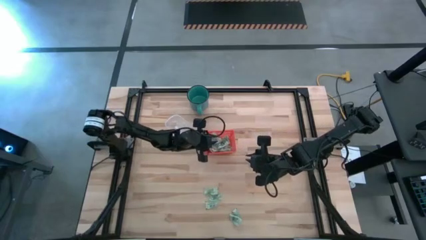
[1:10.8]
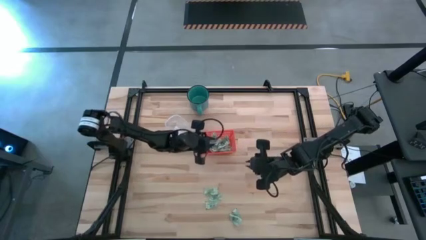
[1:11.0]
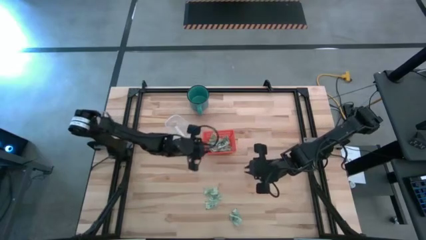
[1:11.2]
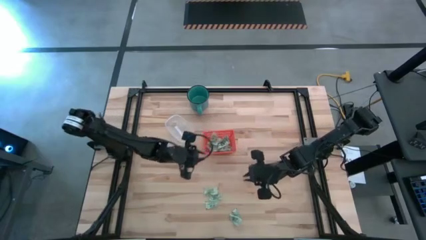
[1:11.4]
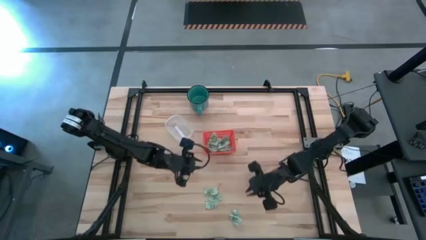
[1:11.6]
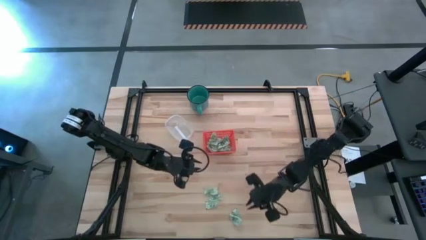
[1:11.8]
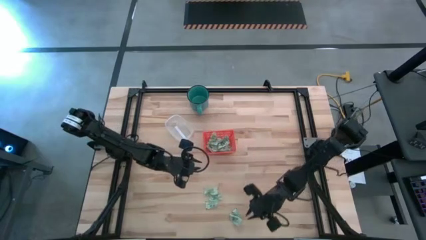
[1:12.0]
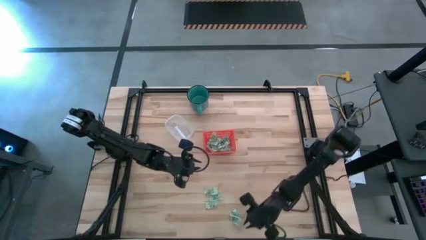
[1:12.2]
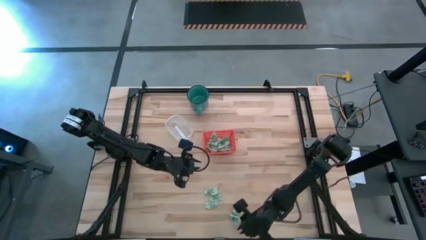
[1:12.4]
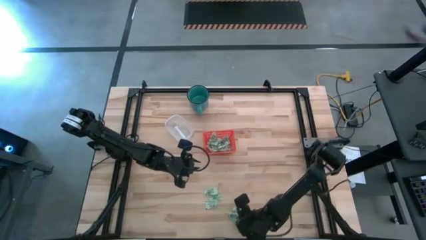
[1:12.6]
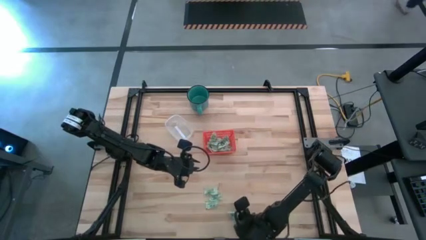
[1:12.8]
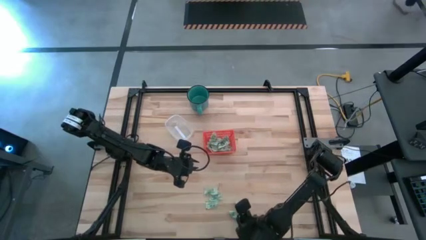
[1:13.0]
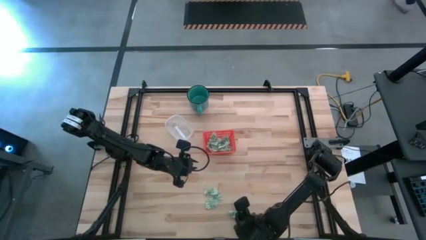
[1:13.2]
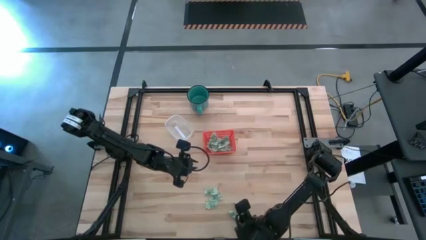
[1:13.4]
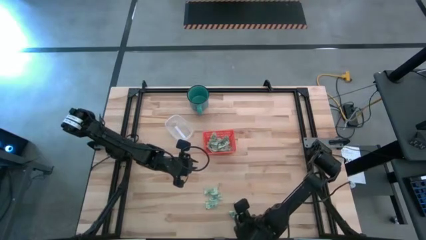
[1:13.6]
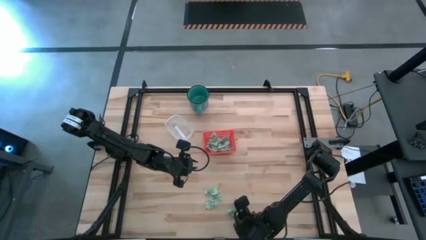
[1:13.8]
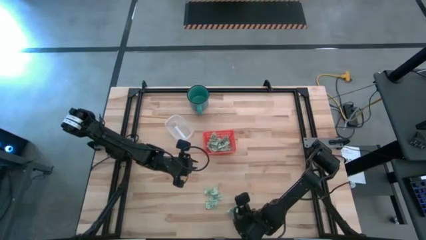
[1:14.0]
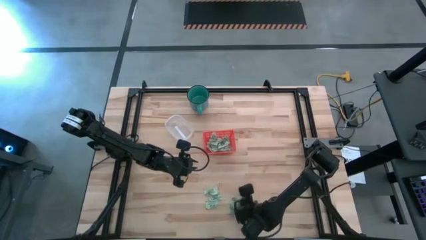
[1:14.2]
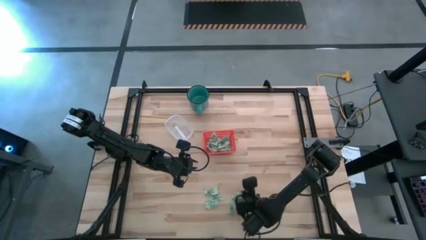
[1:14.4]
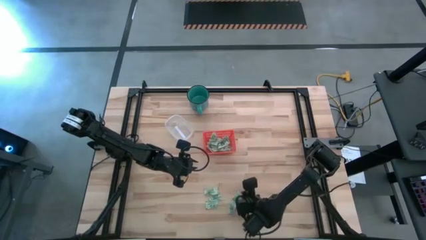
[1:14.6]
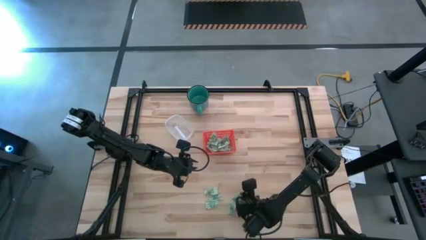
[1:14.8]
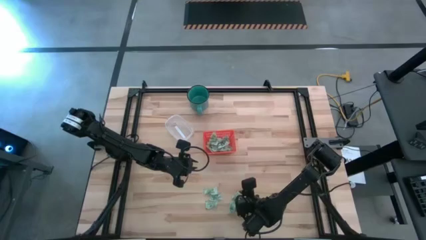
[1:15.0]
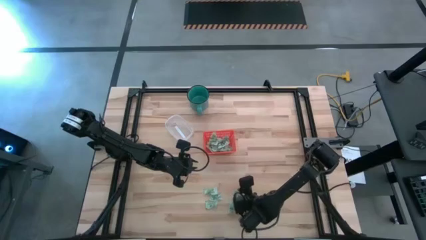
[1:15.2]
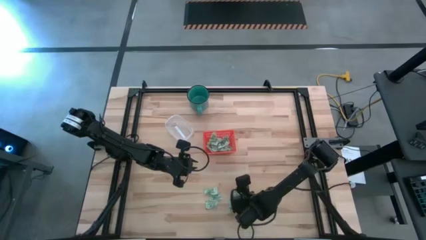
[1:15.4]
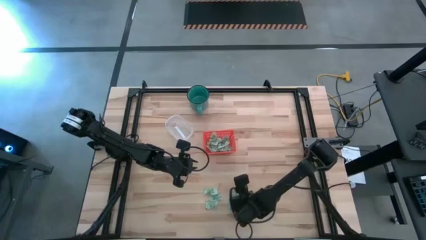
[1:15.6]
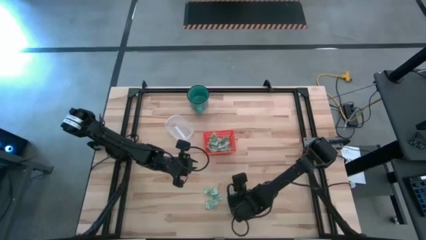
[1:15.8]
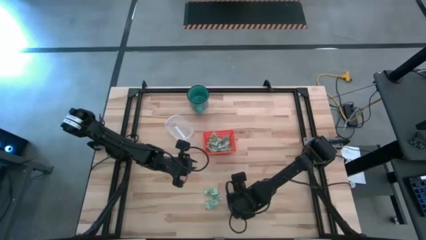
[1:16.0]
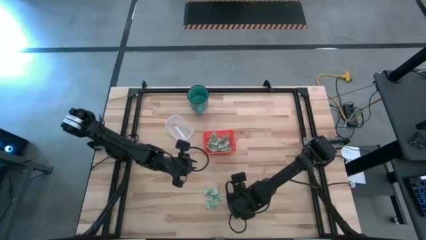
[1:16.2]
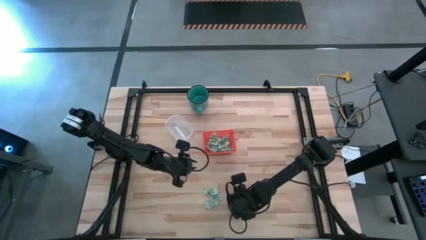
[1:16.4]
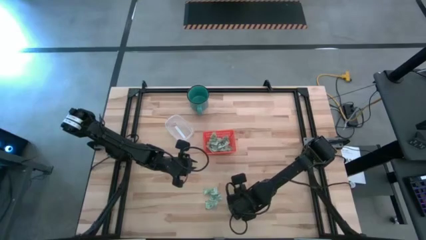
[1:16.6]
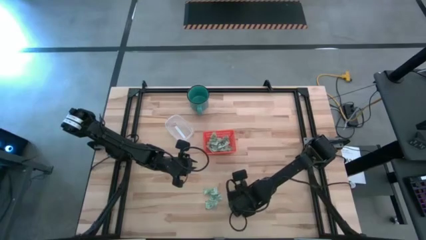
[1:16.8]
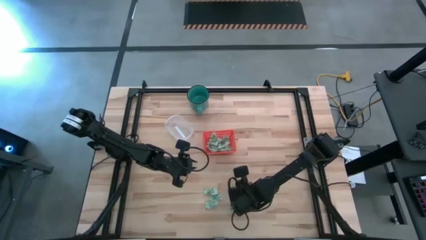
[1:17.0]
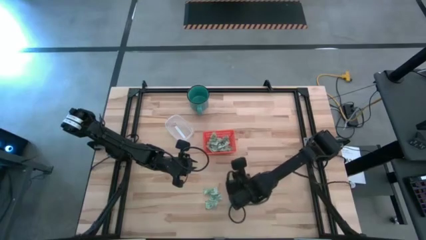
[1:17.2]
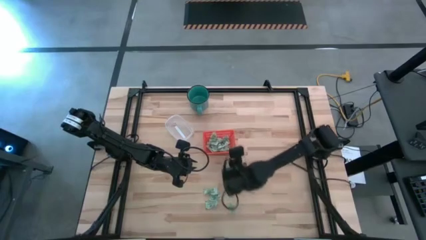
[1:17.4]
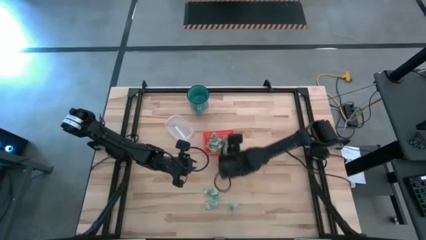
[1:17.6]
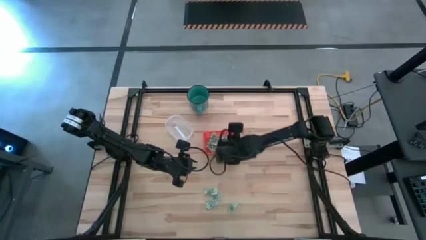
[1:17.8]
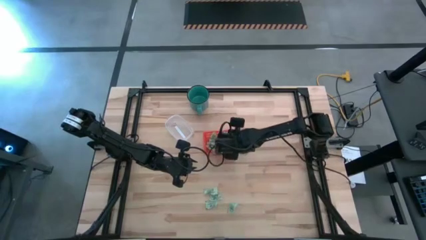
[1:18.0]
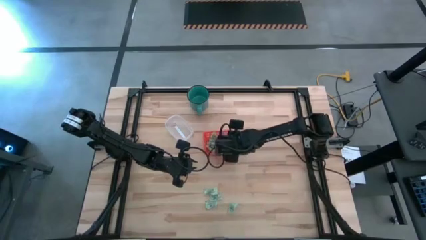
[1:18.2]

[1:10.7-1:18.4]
Task: Pick and place items into bin
Put the stevia packet into the orange bin

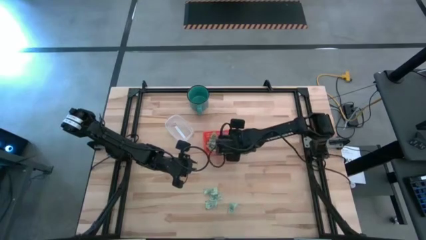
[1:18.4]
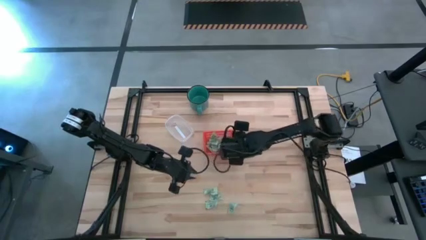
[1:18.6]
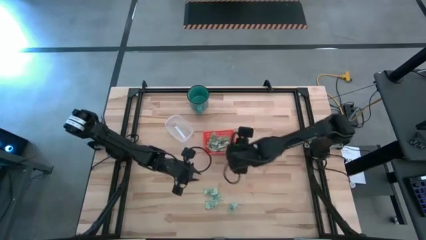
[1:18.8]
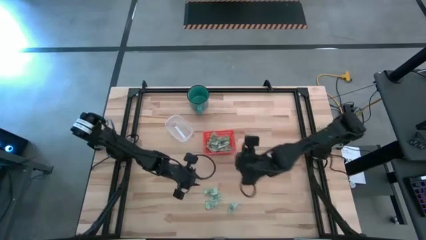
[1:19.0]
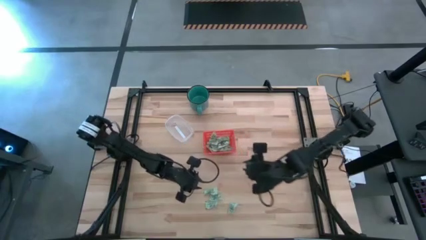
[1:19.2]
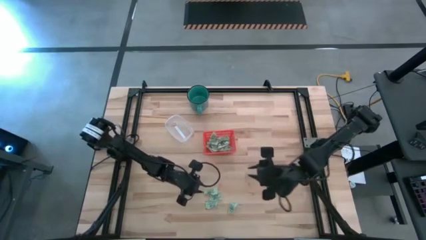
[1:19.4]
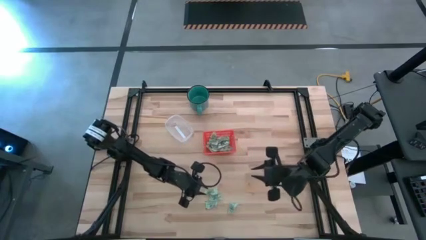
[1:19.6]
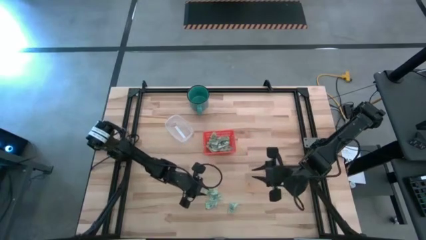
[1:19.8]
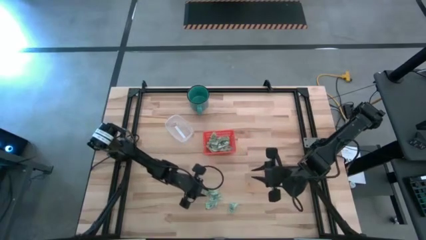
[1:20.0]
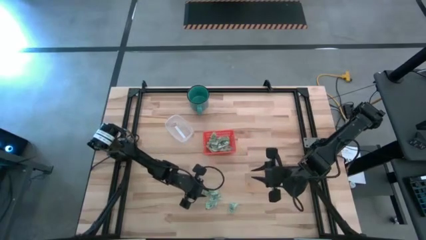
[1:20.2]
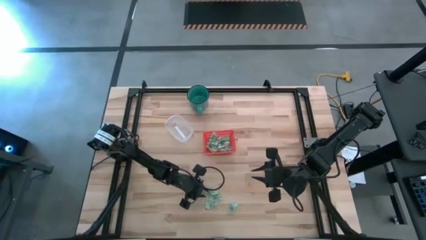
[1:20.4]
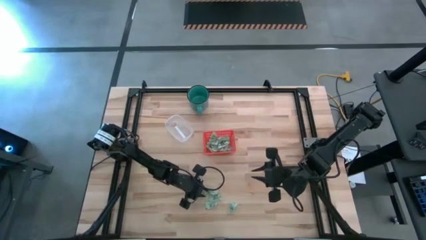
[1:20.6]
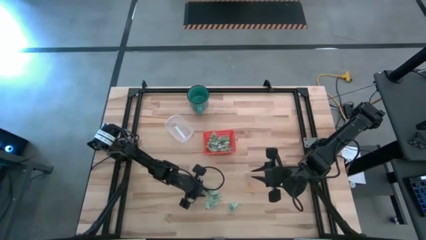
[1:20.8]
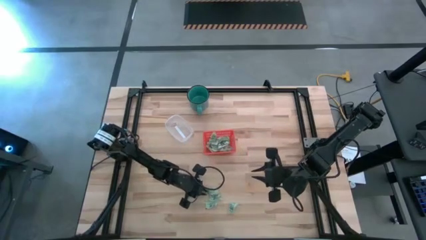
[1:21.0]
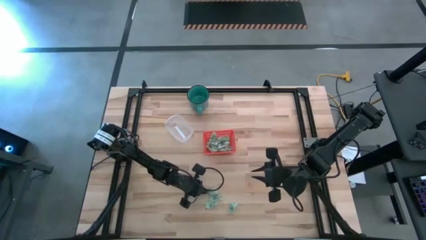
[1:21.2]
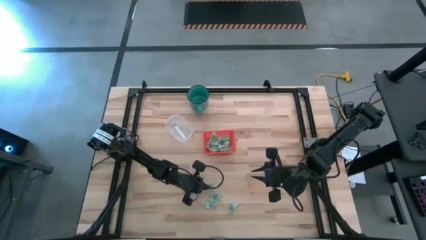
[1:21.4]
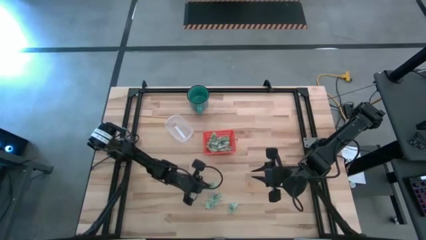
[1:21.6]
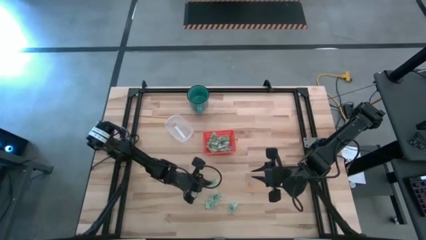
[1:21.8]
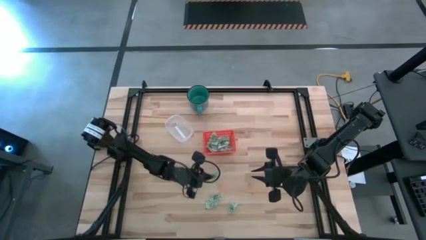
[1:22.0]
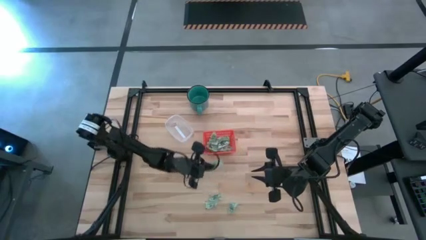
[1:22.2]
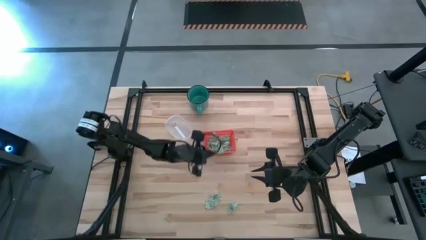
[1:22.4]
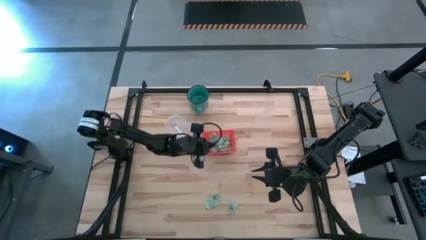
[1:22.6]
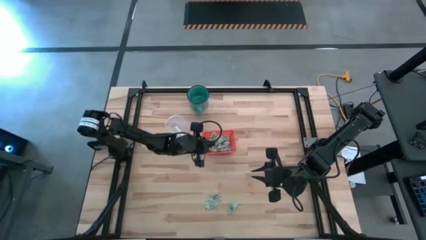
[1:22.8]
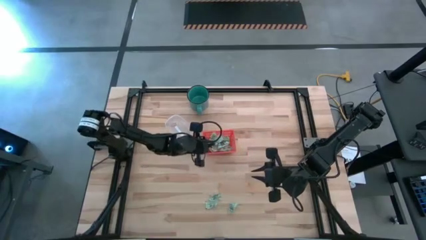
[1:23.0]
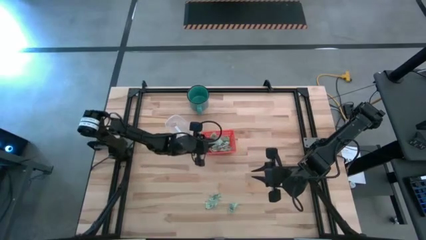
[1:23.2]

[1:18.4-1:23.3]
Put the stevia packet into the orange bin

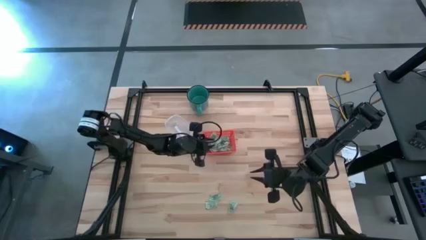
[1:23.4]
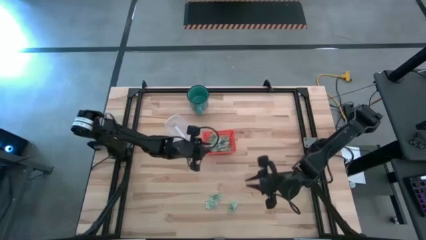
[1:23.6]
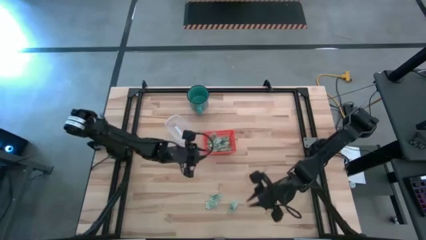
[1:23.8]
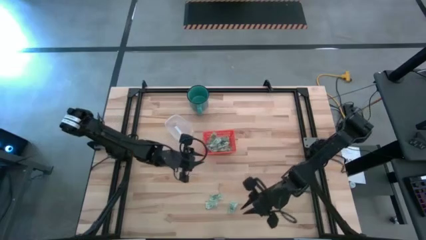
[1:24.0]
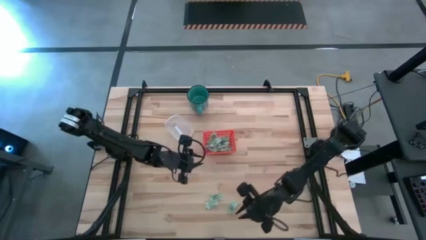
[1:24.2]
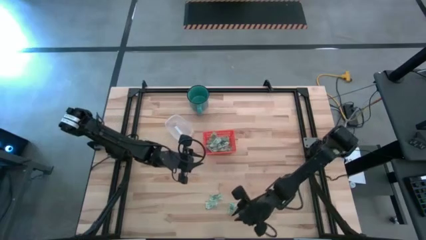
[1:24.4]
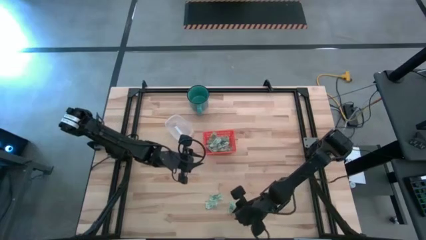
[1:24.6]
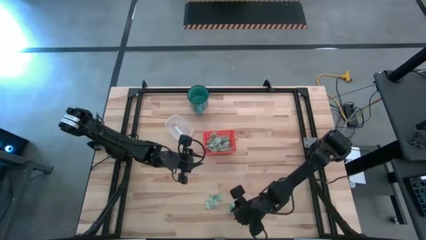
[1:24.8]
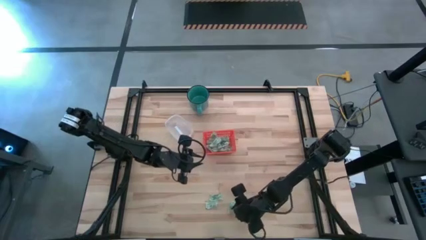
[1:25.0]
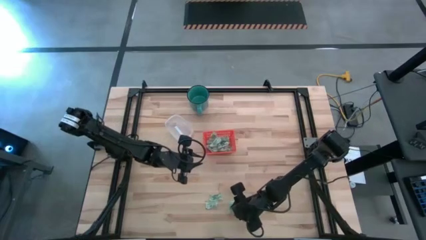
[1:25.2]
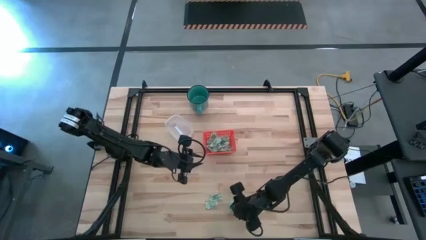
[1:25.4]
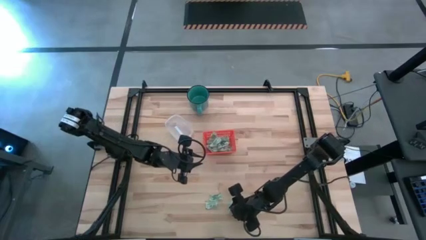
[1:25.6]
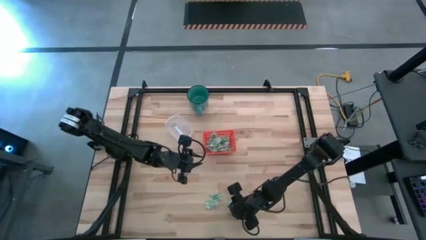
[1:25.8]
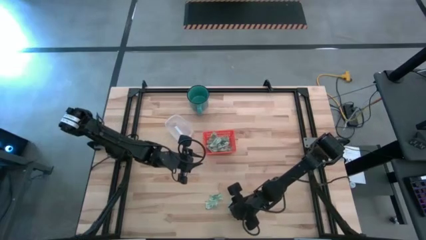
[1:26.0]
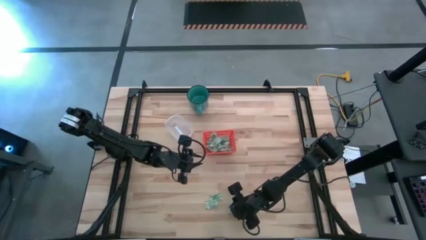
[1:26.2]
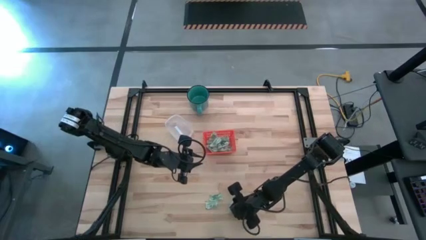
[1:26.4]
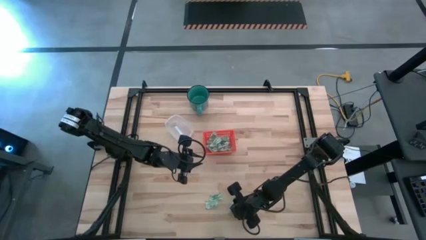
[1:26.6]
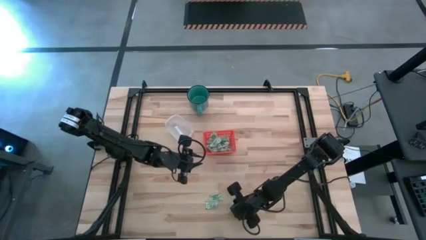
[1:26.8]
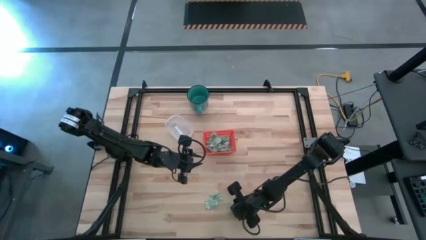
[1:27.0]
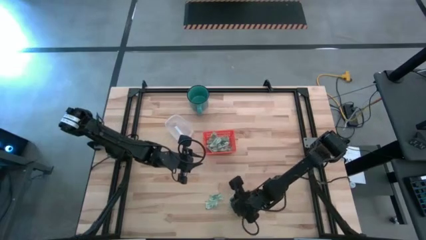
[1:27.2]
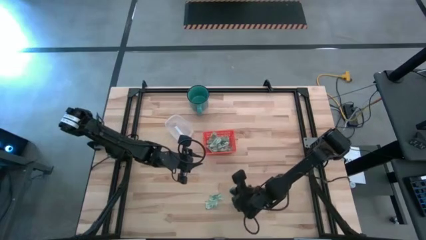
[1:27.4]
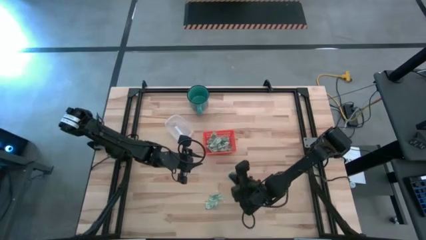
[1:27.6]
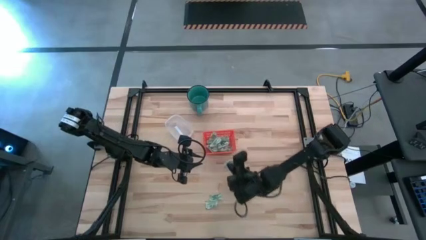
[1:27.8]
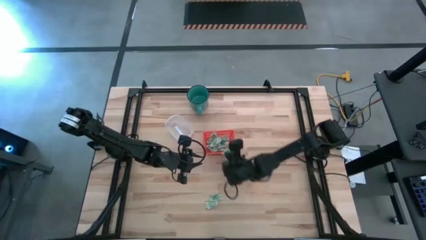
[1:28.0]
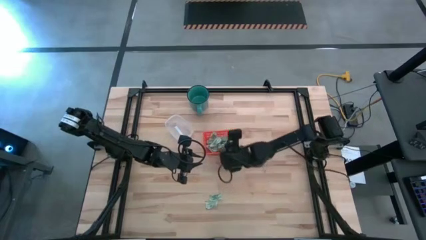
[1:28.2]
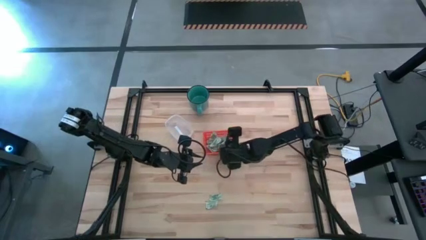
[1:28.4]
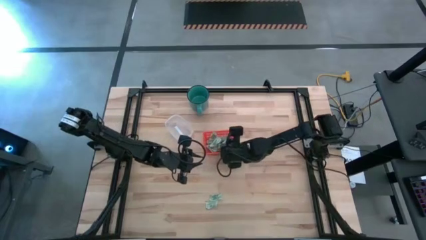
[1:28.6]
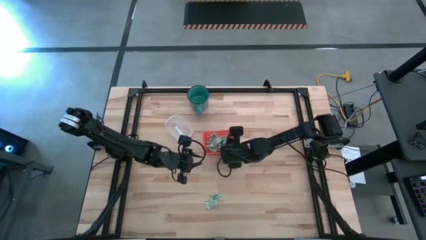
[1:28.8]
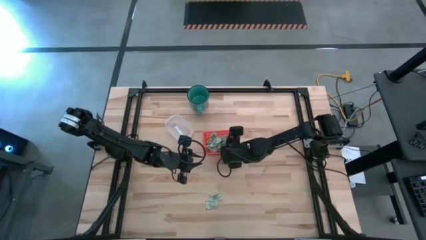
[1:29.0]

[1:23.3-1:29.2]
Put the stevia packet into the orange bin
